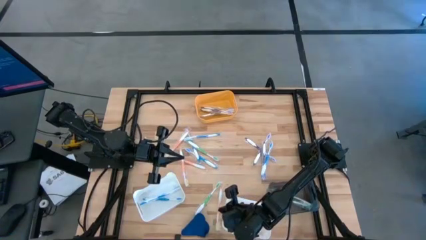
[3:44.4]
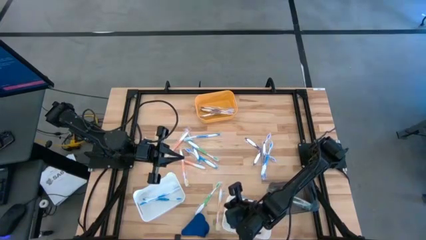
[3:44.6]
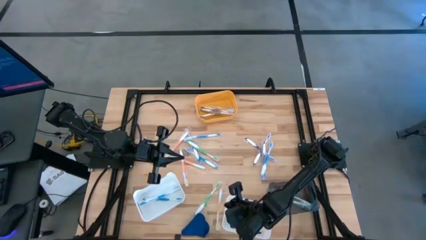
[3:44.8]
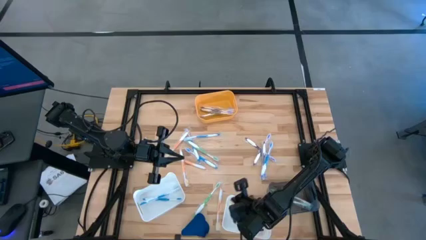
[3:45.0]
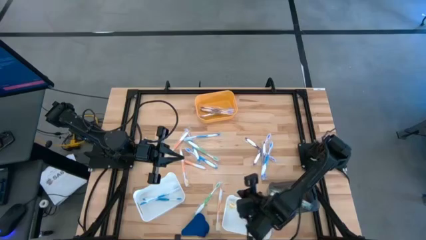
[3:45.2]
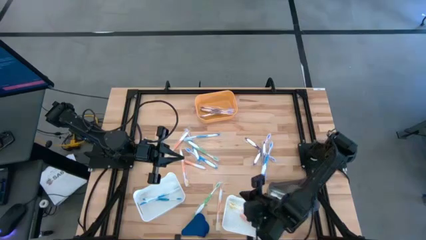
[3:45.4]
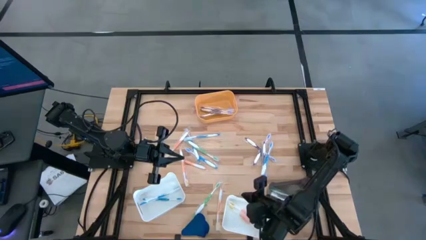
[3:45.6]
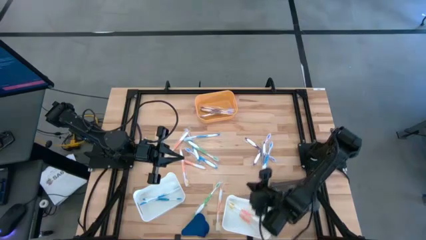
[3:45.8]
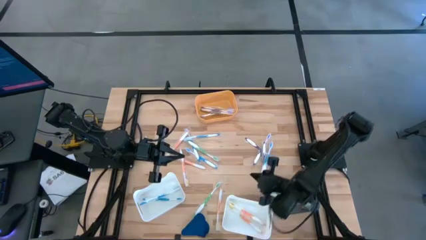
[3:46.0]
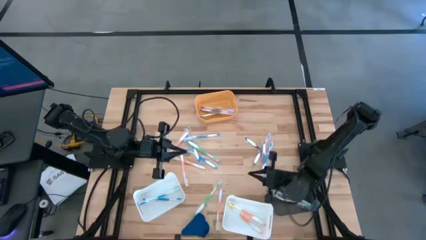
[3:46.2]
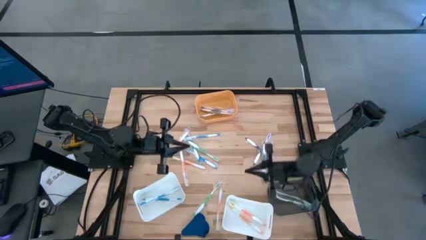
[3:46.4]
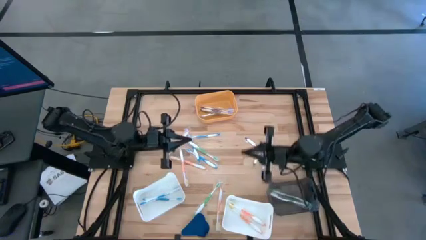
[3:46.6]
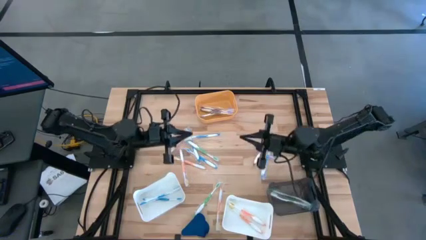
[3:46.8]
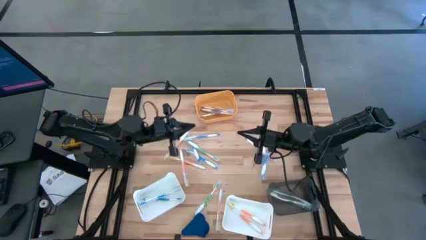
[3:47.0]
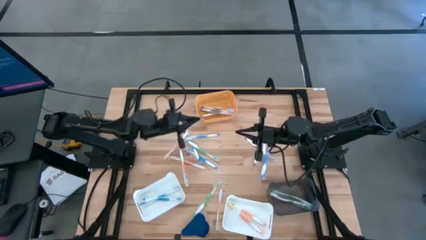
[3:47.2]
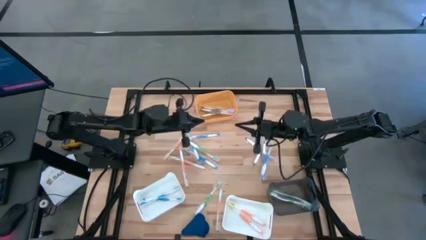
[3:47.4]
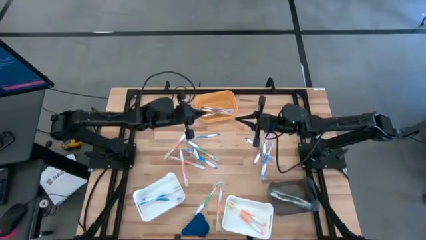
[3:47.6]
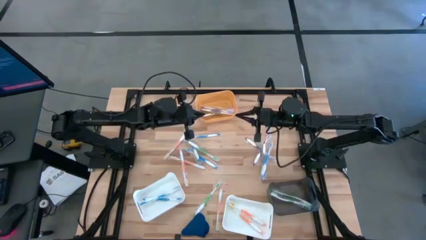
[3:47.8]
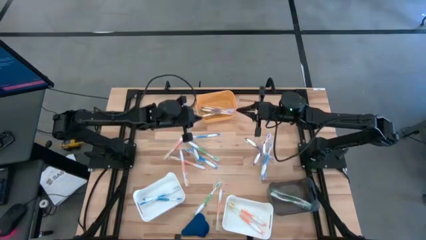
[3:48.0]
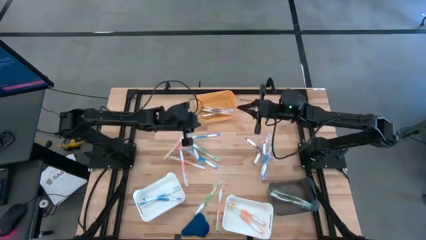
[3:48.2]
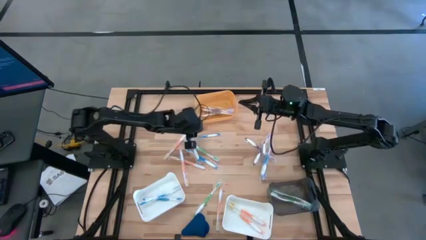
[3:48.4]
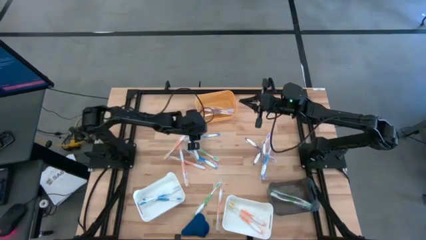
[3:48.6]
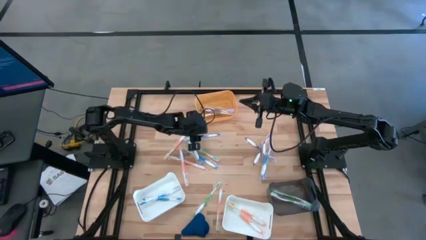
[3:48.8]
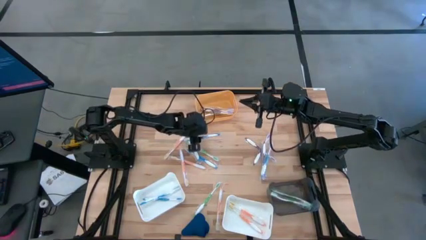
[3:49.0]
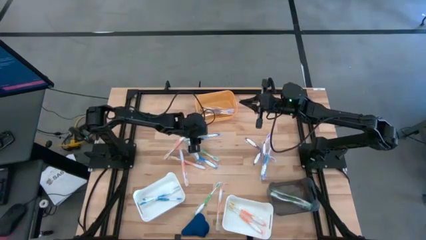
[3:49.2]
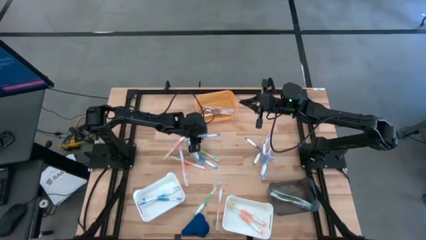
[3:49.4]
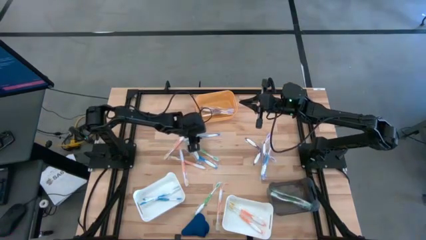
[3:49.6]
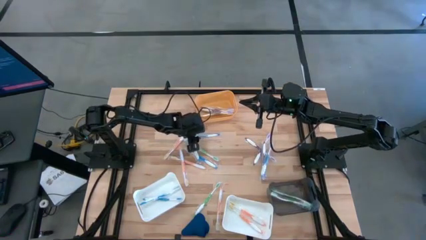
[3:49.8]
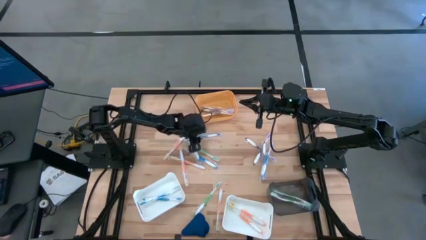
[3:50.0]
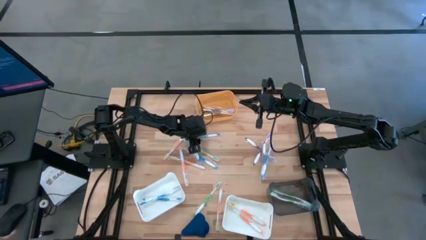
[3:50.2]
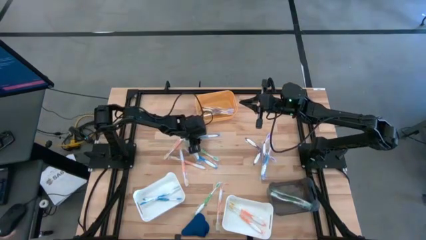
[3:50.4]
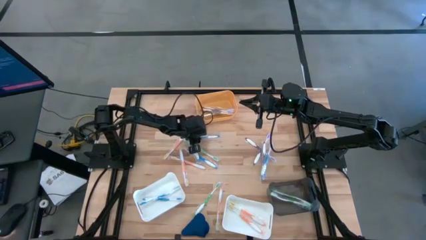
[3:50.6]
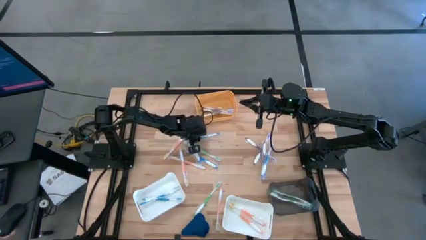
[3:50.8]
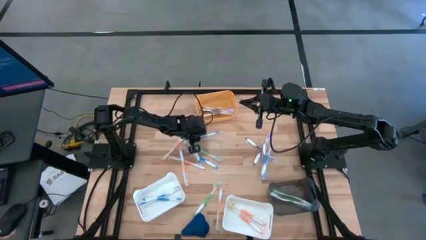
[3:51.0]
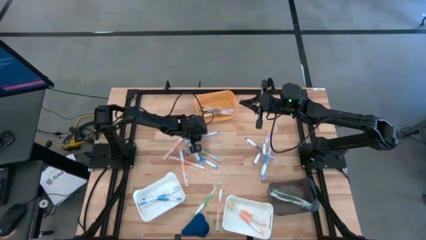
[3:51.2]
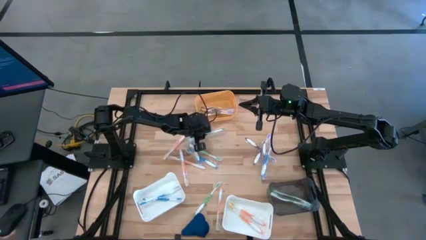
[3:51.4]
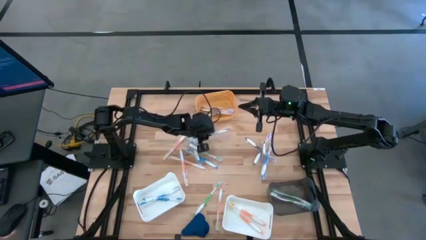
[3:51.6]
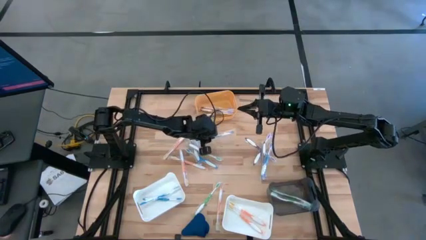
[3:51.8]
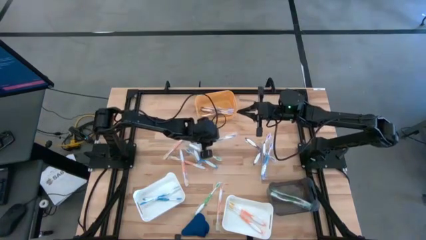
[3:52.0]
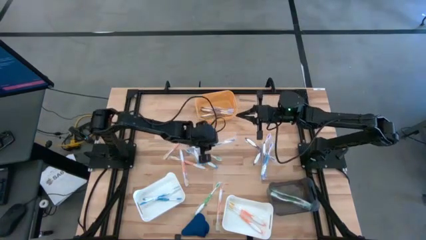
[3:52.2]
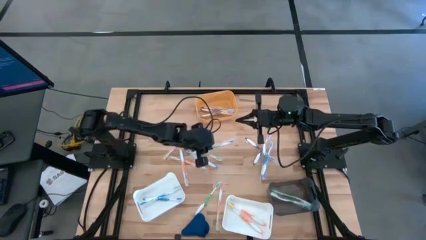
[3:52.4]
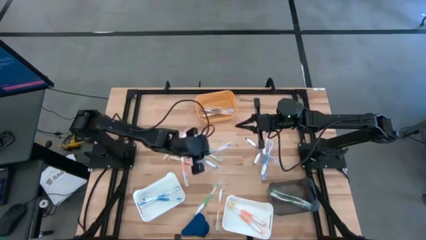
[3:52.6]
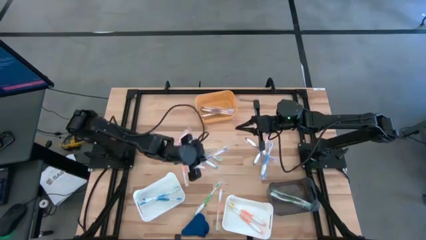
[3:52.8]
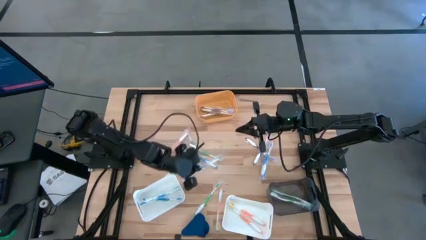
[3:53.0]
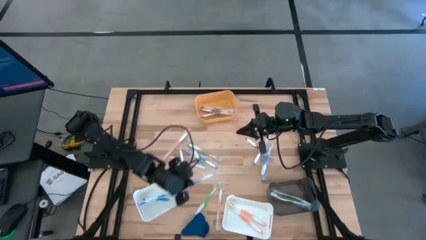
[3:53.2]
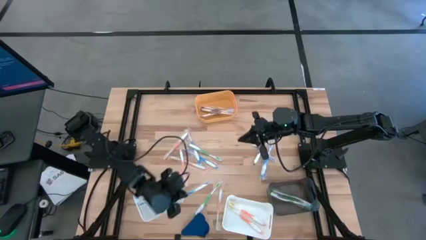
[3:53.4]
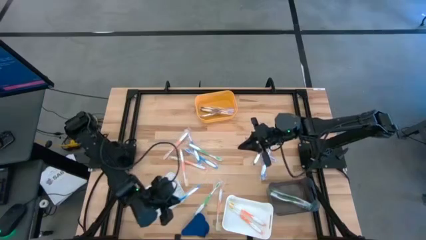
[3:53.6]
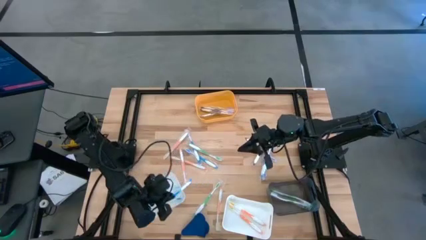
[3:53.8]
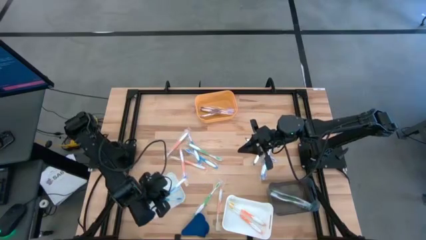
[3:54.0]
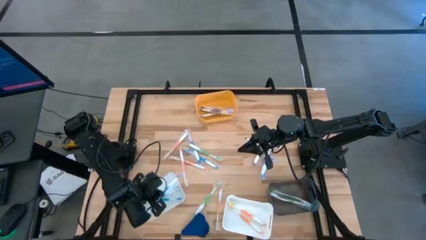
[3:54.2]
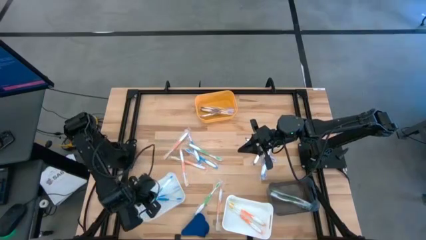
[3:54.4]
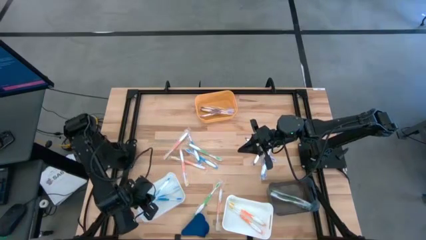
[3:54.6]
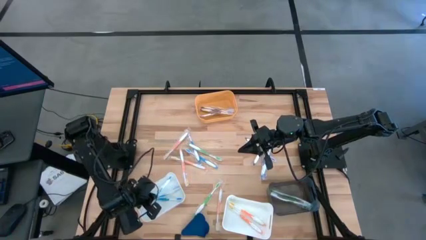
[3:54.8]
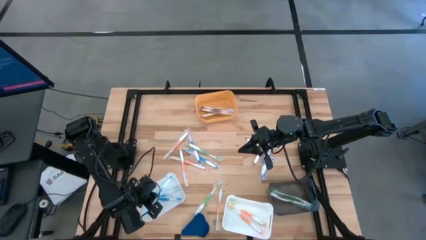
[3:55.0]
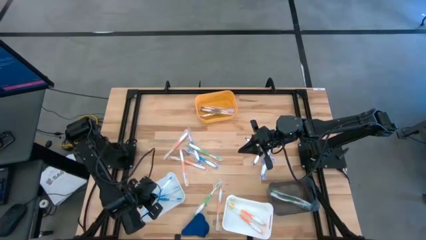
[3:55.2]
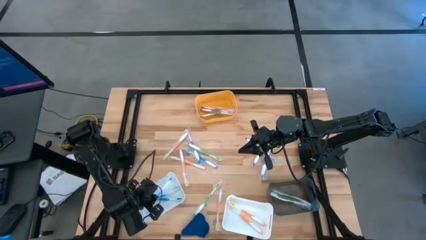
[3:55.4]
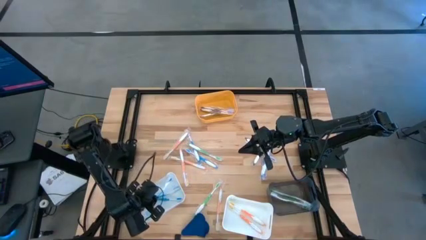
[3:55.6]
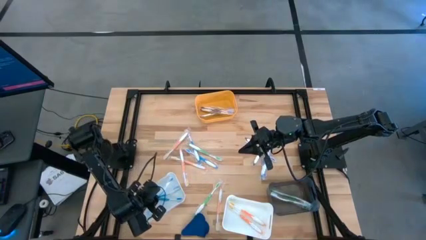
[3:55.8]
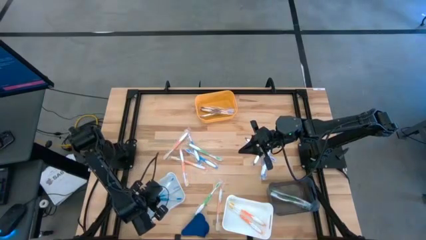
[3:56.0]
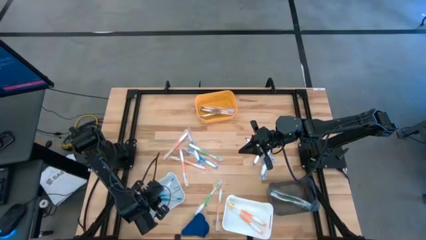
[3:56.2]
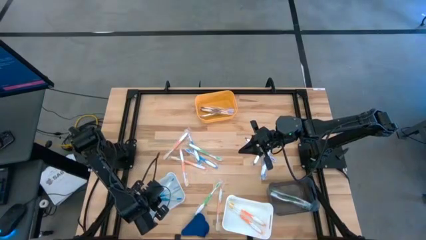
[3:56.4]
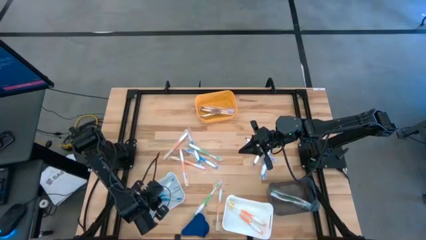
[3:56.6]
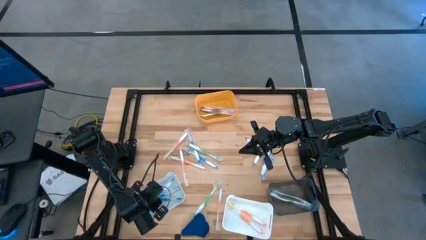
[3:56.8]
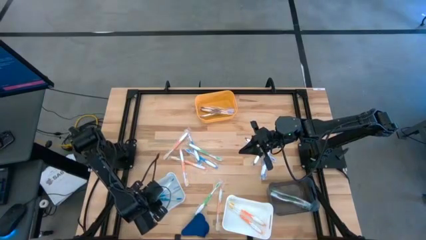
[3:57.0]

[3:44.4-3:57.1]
Task: Pick & Place Toothbrushes
Put the blue toothbrush into the left white bin

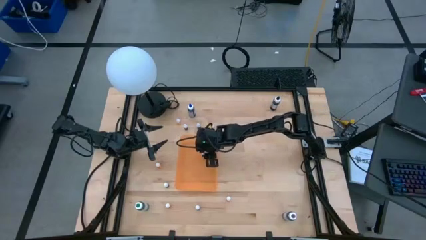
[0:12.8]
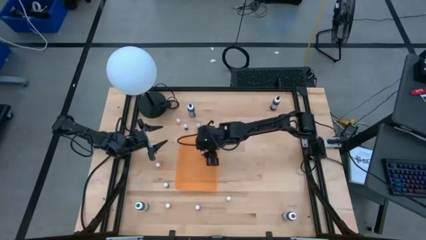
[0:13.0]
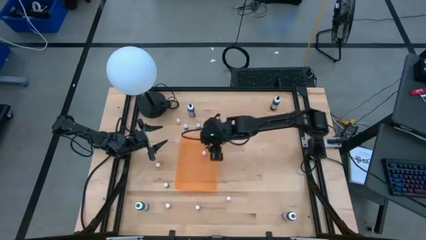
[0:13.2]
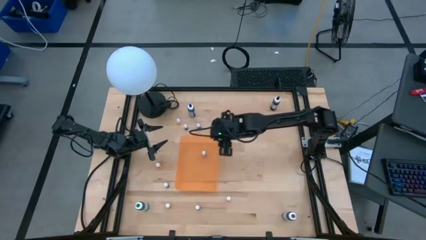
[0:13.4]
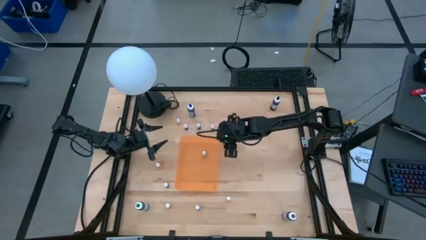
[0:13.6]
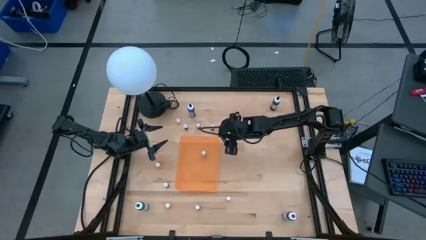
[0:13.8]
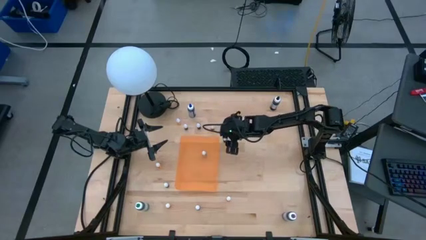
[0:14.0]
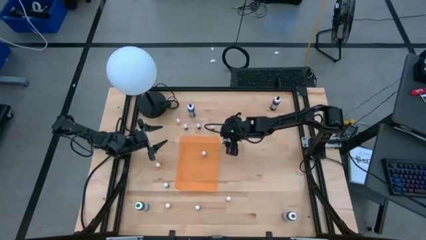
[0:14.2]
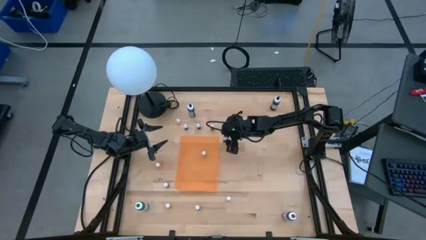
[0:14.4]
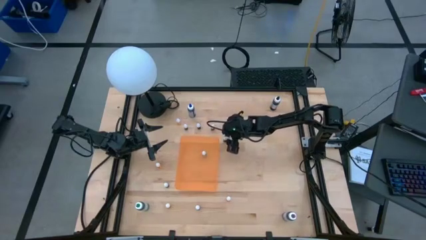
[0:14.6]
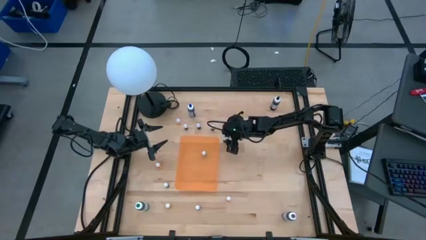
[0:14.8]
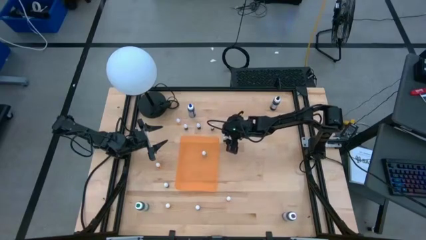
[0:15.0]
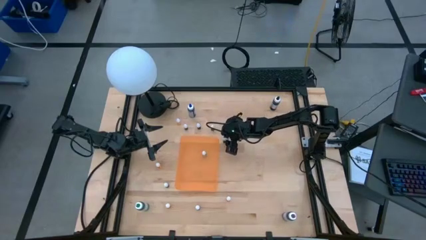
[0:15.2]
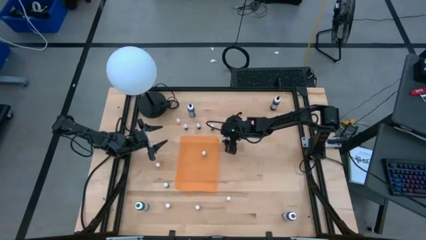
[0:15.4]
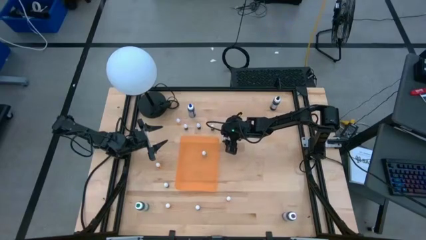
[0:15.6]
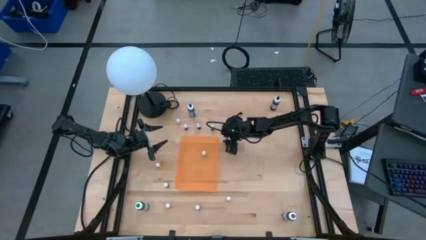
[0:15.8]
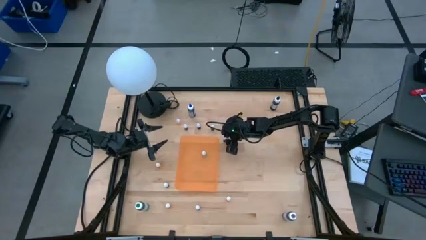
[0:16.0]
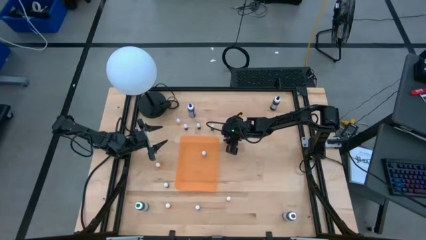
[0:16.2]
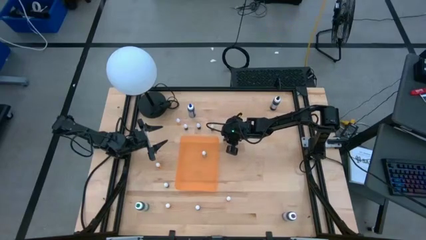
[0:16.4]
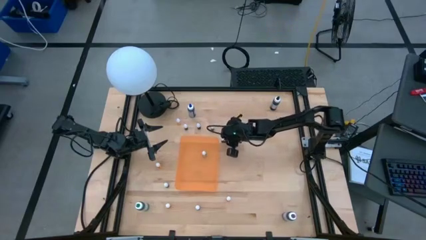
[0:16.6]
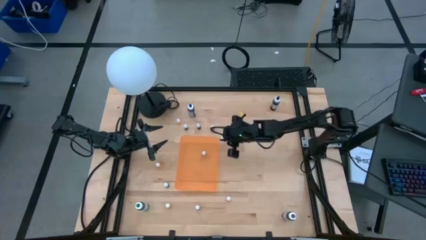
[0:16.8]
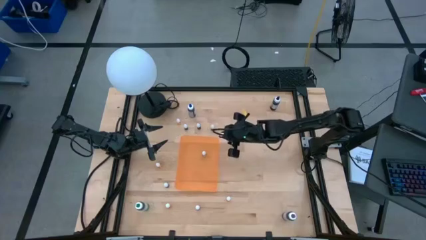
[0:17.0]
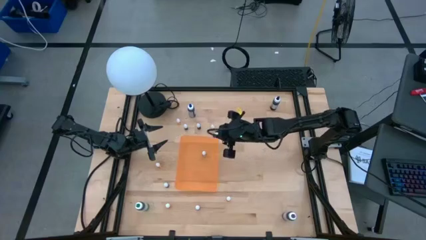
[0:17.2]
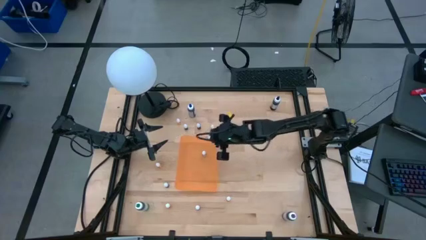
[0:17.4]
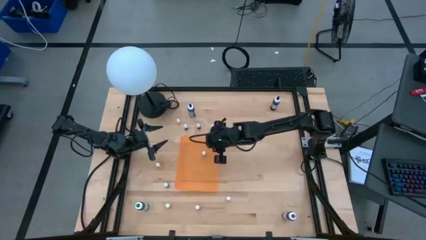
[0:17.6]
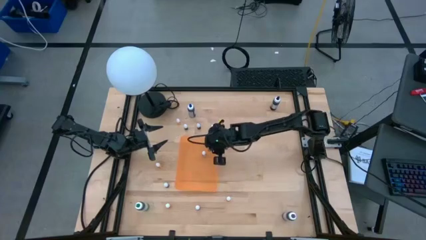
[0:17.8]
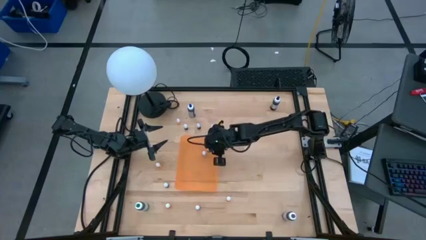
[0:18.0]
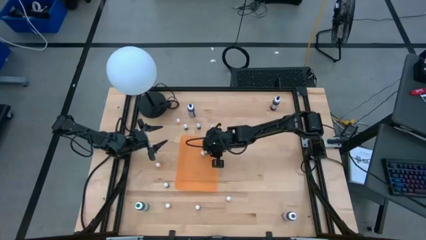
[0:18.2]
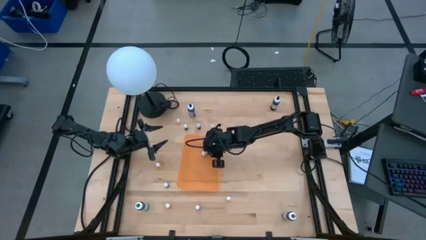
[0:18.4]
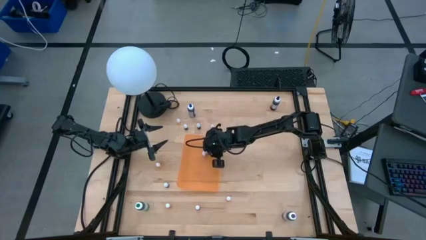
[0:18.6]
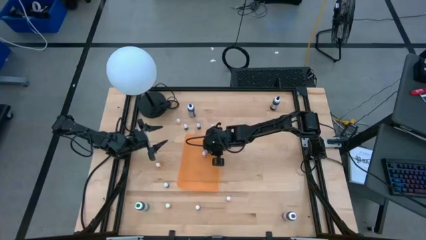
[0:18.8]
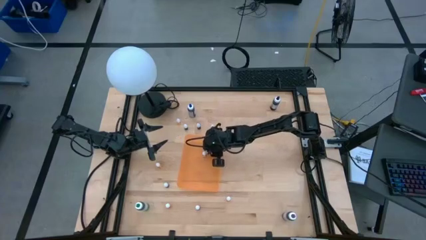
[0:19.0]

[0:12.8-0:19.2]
Task: Pick & Place food coloring
Put the small dark purple food coloring bottle into the orange bin
